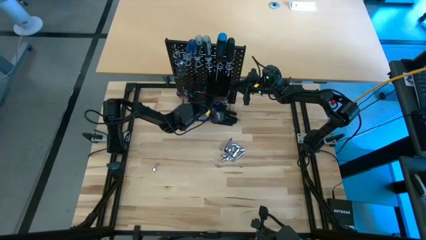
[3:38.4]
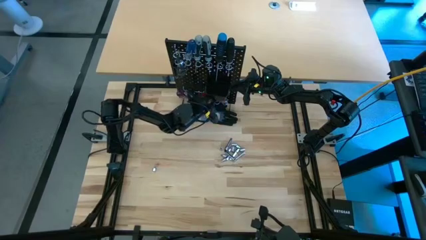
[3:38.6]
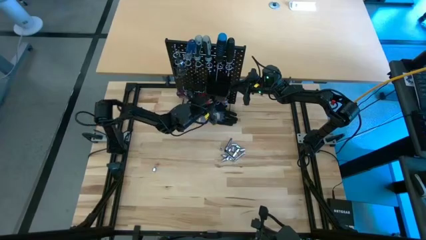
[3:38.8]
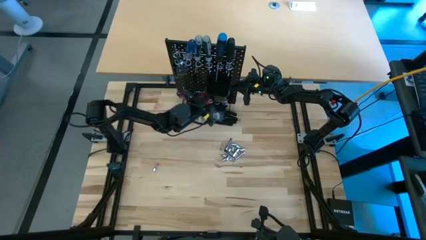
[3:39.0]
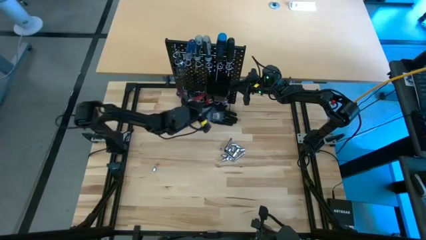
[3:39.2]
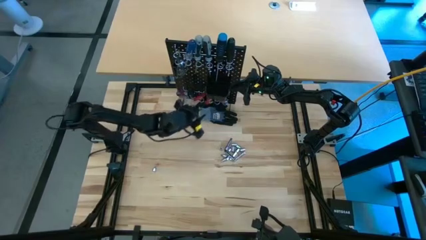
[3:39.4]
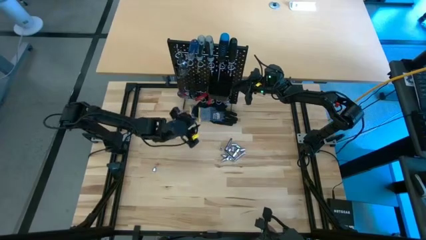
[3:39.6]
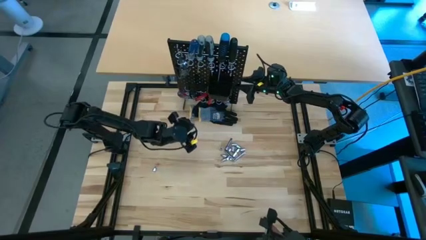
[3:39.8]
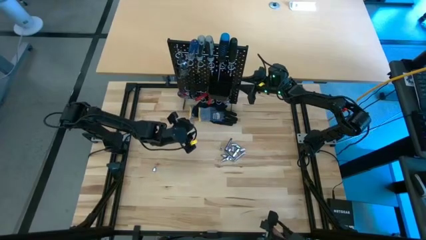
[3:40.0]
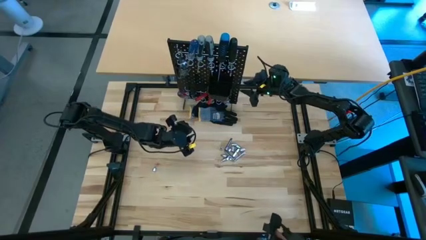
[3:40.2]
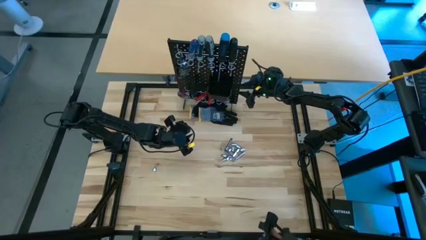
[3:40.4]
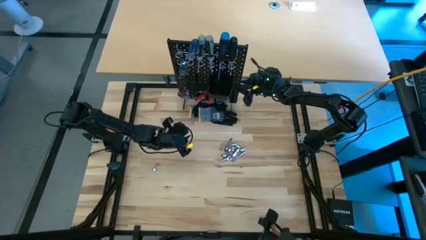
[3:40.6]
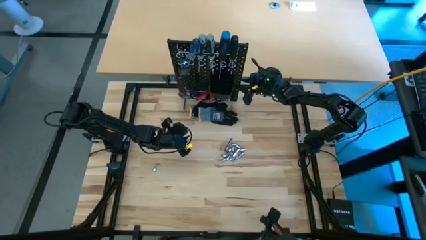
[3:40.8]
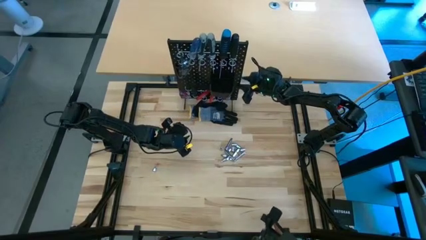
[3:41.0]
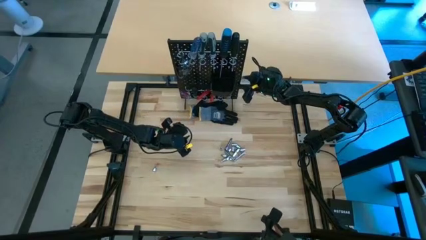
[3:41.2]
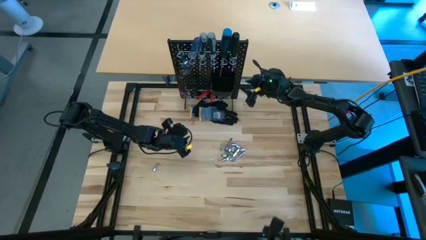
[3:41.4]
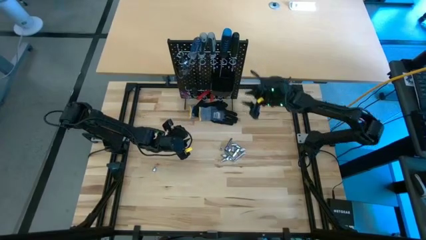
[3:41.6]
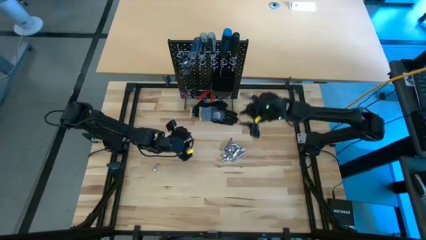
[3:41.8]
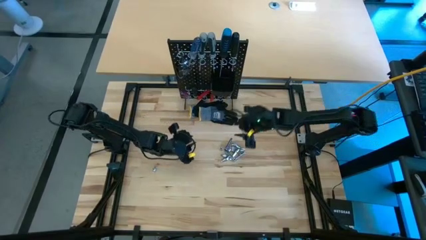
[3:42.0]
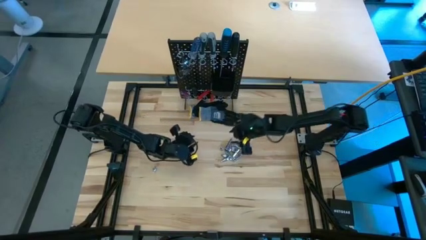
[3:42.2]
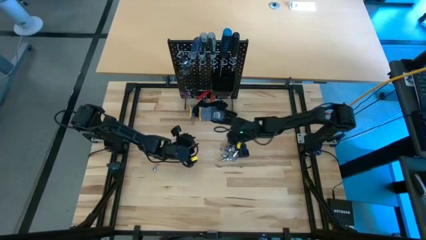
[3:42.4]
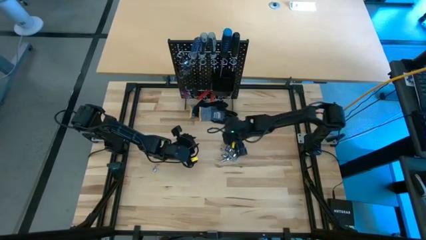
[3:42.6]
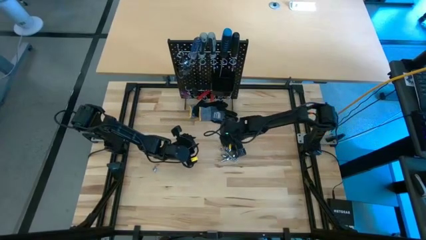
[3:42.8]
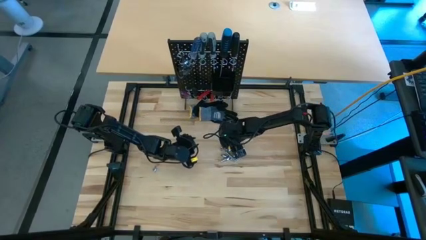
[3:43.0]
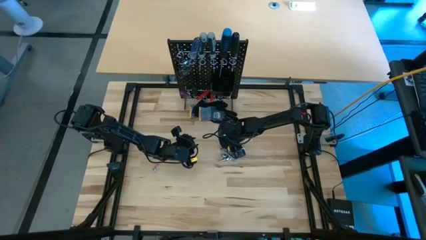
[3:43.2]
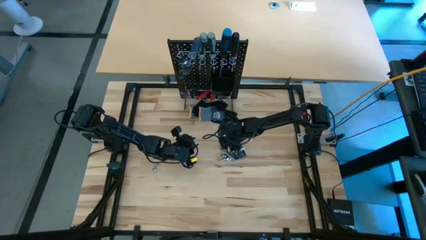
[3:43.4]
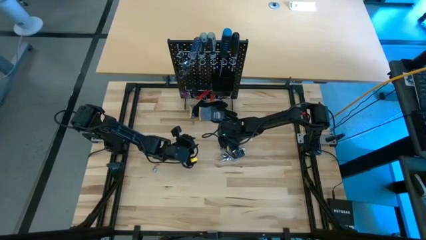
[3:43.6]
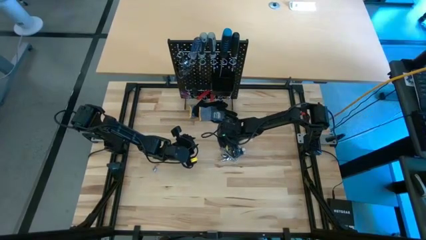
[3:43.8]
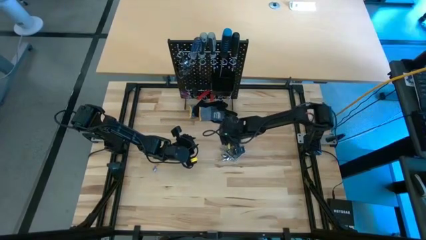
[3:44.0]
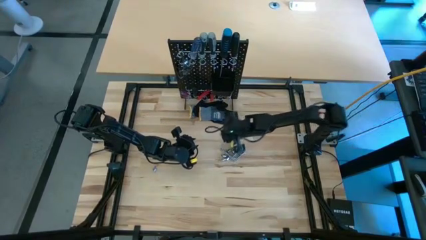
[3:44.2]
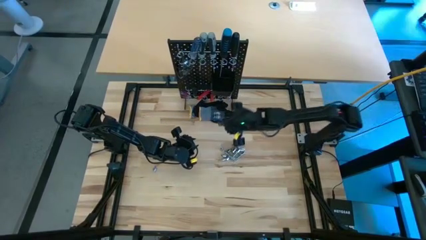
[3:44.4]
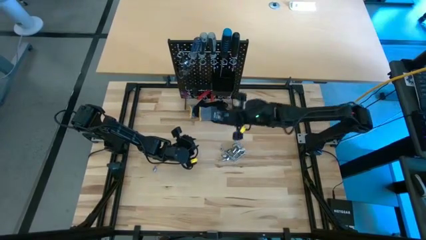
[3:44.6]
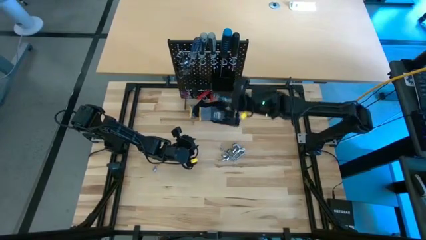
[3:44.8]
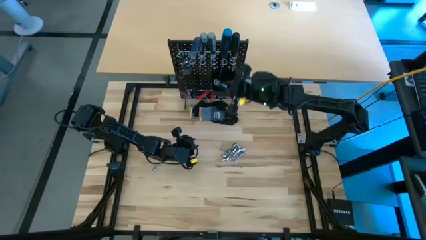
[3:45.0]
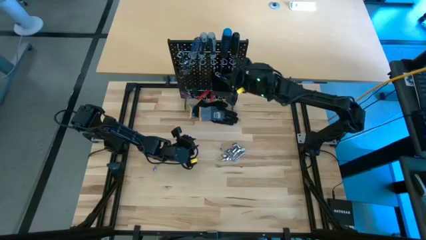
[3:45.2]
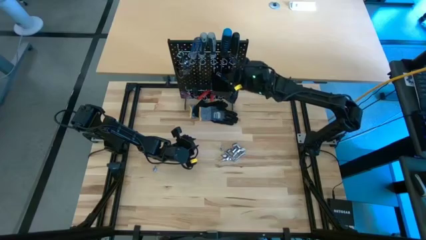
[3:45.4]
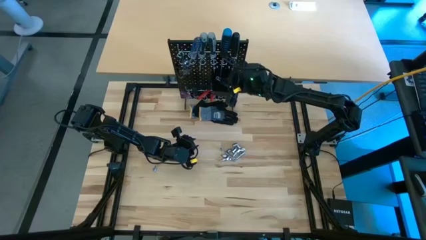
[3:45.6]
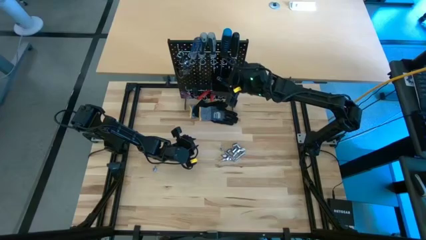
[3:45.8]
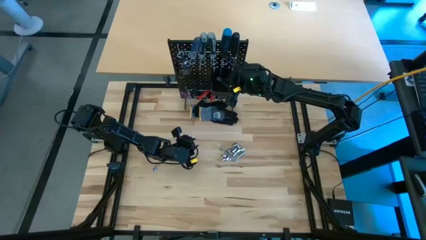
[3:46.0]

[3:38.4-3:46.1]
Task: Hang tools onto peg board
Put the extension bar into the pegboard bin

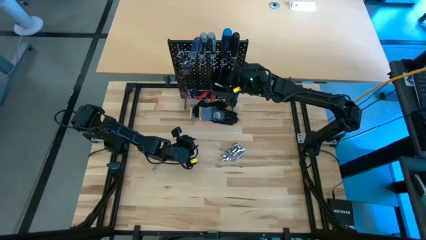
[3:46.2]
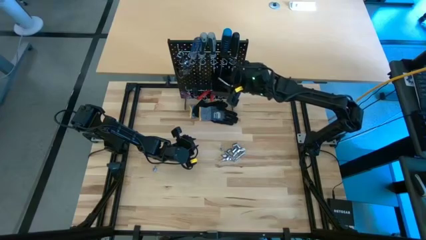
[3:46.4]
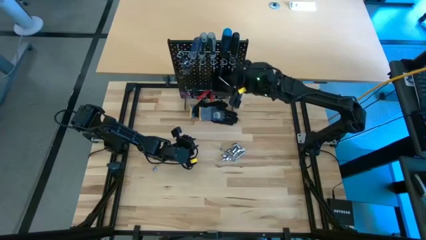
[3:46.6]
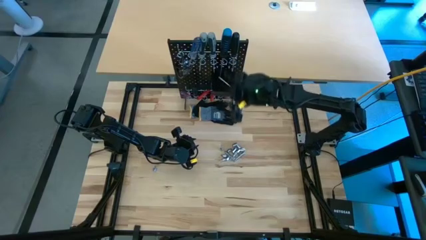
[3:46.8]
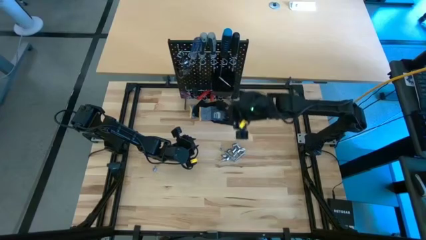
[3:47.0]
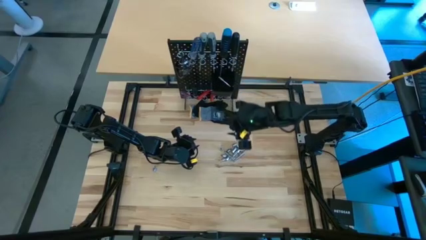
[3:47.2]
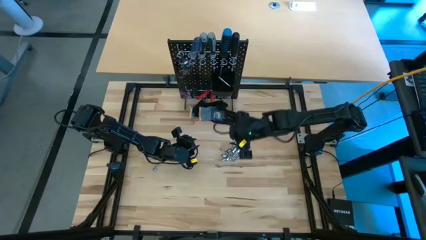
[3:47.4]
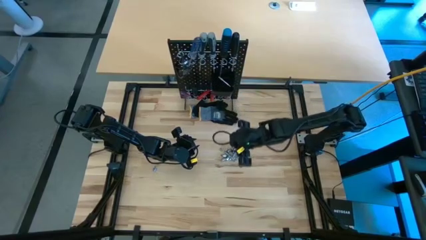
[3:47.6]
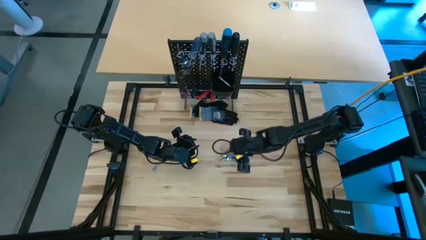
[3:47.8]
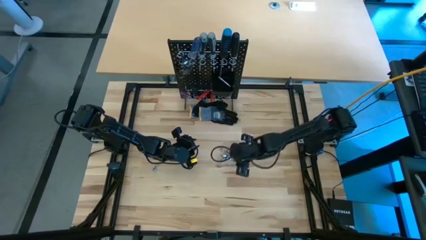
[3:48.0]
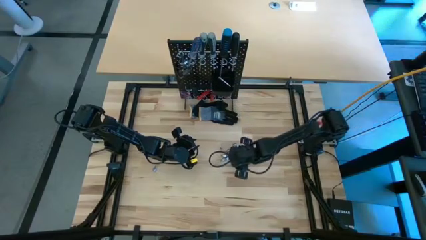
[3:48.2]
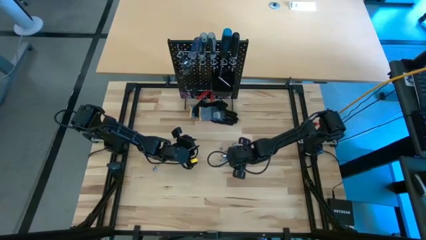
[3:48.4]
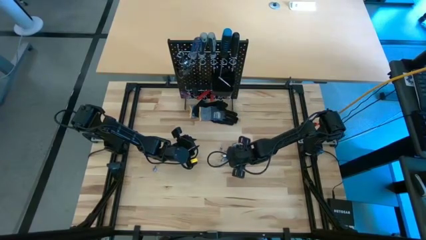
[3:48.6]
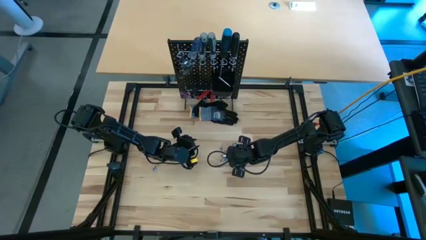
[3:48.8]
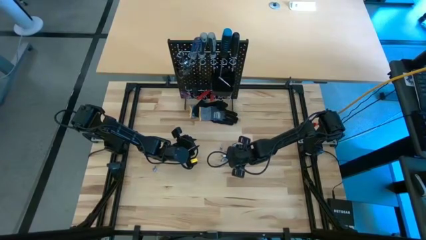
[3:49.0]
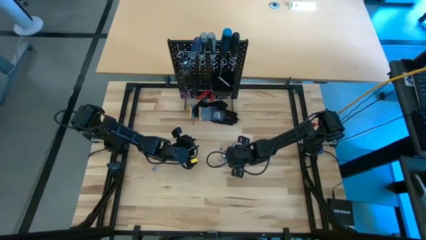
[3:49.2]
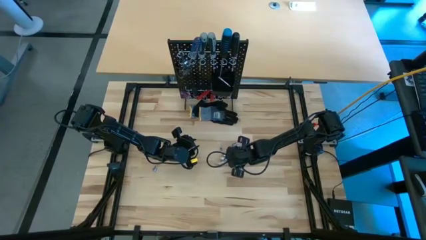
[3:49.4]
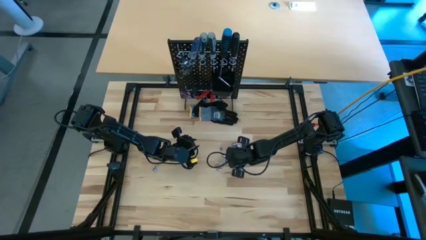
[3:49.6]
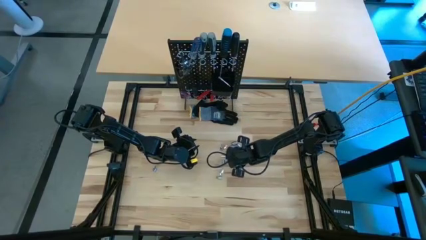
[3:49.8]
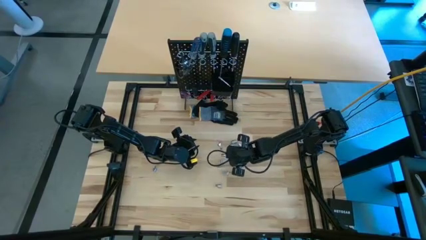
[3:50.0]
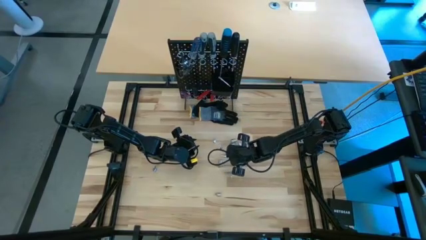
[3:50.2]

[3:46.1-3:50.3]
Put the extension bar into the pegboard bin

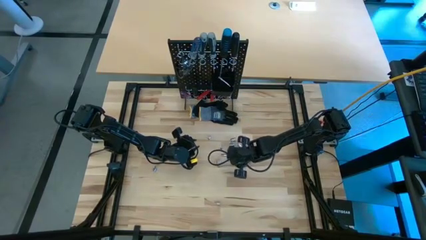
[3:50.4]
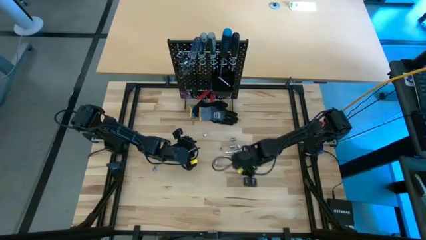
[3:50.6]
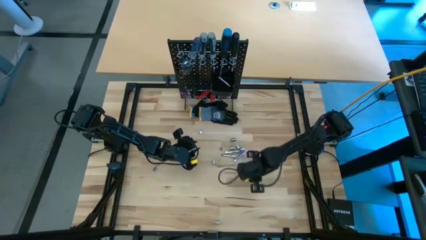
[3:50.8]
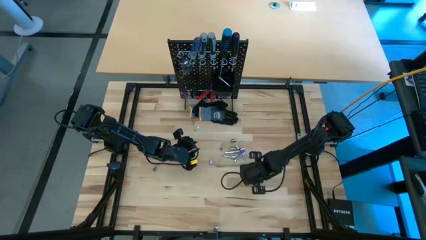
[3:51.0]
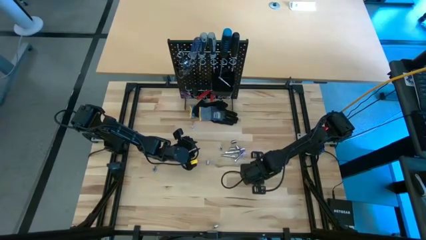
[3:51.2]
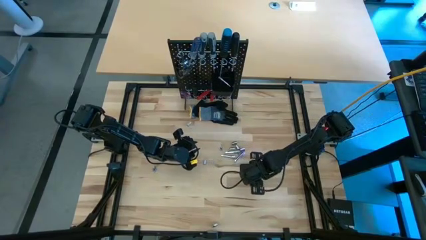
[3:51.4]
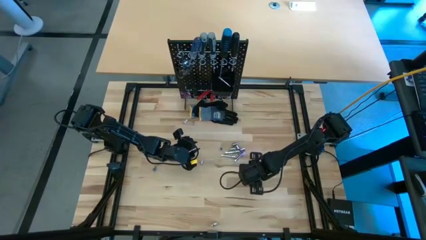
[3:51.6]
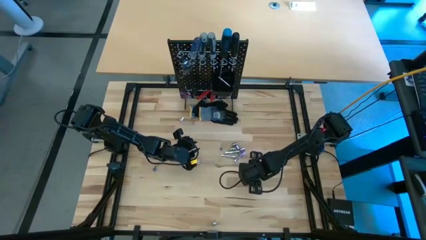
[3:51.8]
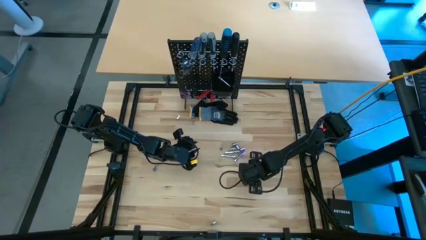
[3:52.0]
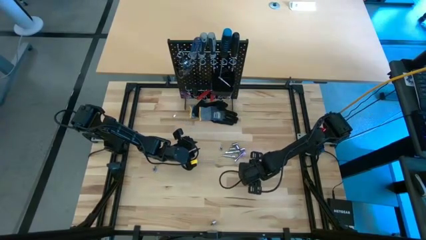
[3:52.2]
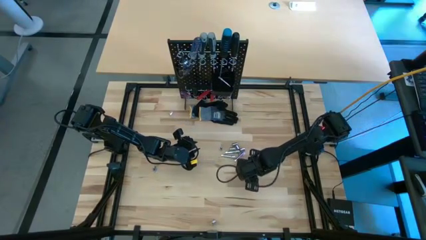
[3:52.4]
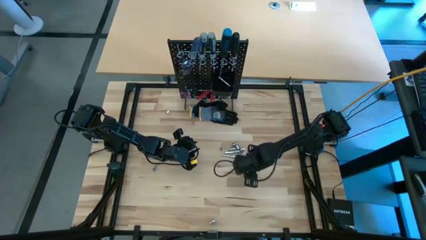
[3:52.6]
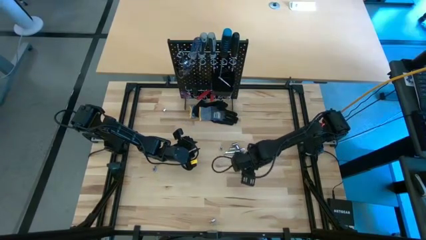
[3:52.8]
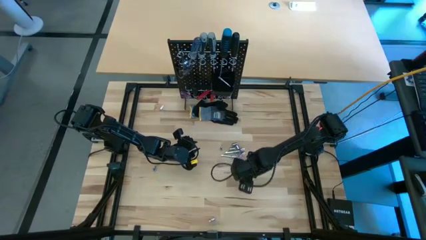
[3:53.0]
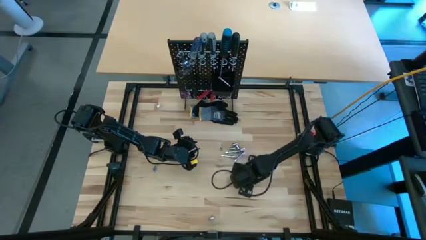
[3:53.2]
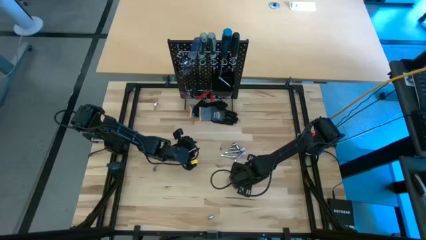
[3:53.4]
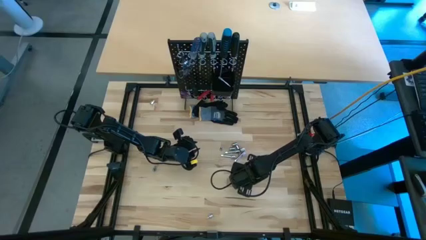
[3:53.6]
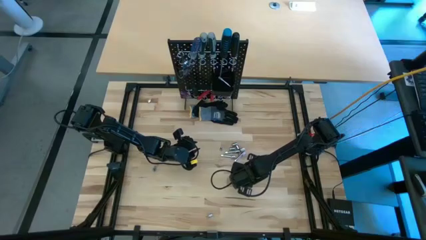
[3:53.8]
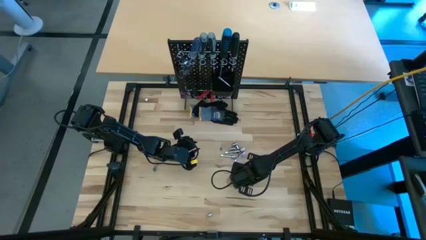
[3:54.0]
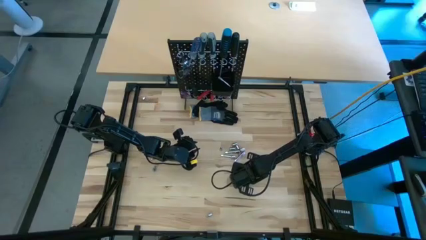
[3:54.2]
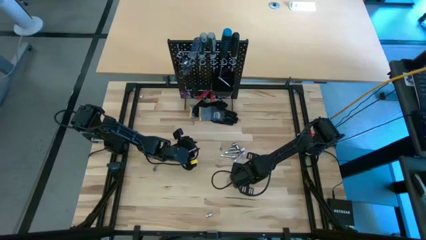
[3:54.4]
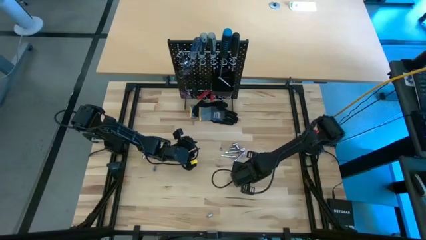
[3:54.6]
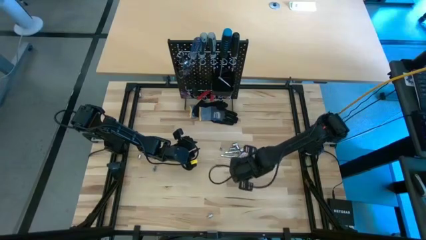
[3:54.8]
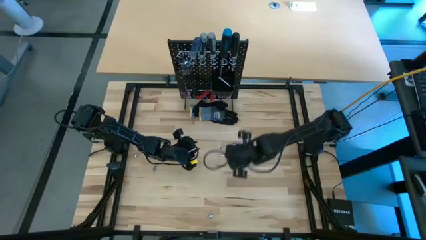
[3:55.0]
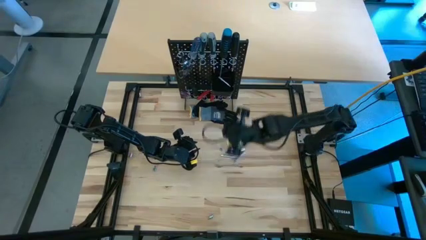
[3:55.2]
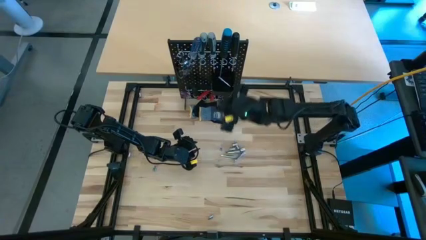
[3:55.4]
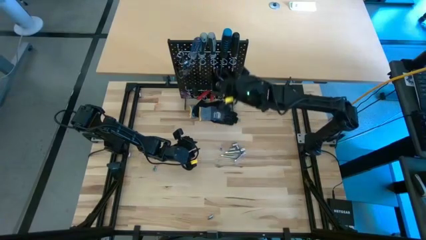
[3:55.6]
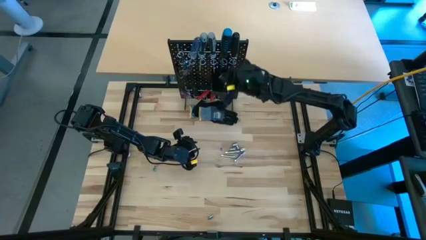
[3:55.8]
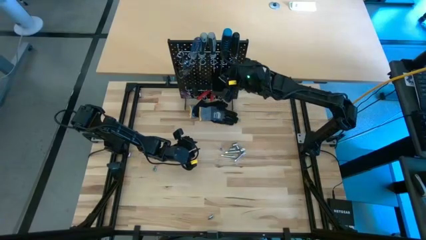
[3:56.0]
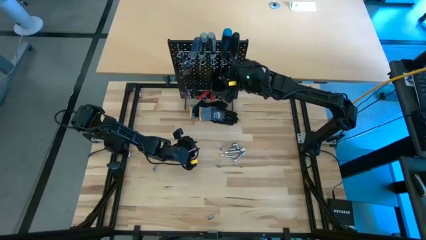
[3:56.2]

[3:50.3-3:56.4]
Put the socket into the pegboard bin
